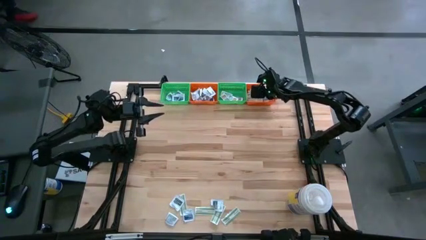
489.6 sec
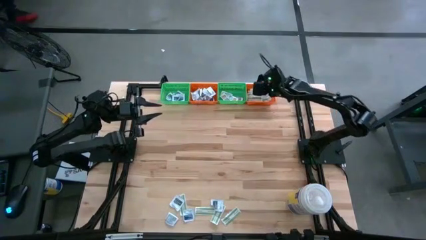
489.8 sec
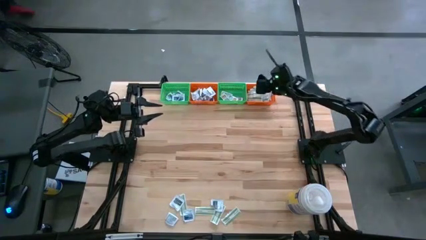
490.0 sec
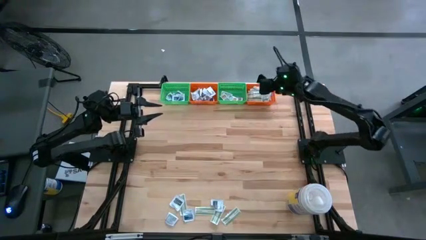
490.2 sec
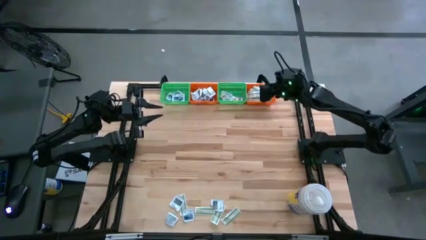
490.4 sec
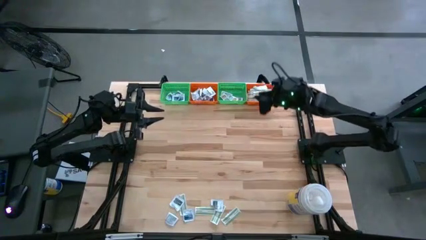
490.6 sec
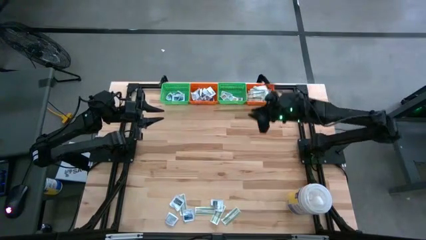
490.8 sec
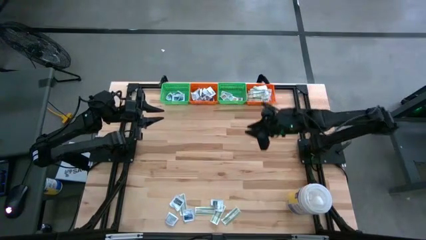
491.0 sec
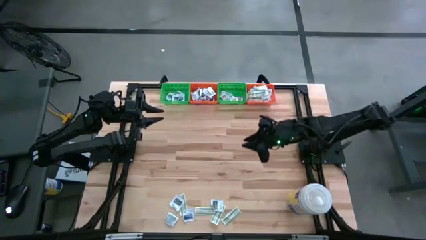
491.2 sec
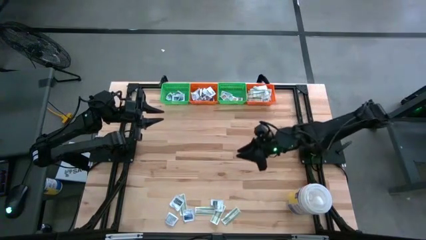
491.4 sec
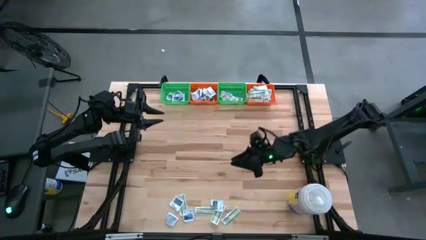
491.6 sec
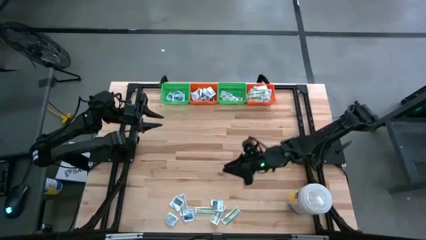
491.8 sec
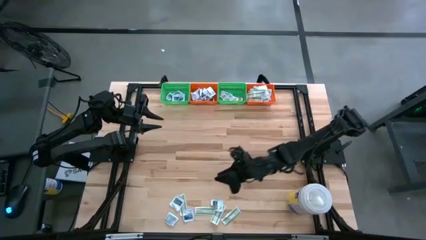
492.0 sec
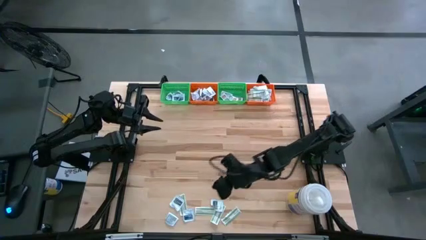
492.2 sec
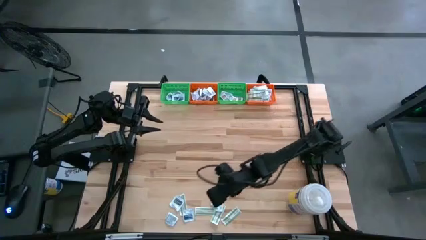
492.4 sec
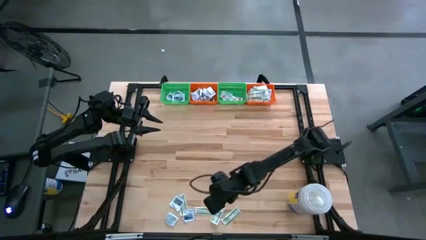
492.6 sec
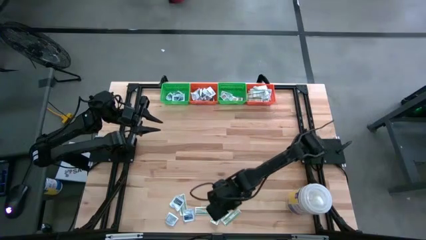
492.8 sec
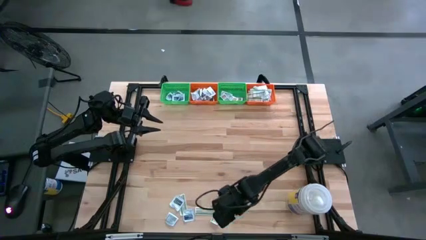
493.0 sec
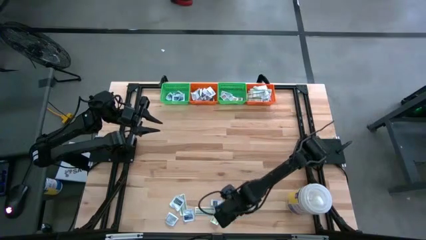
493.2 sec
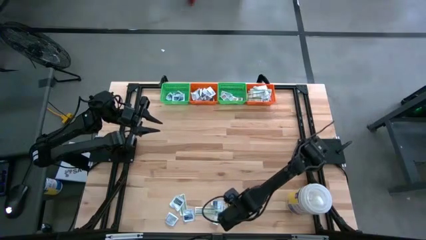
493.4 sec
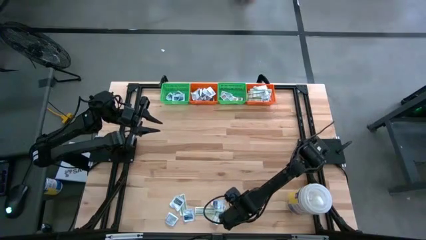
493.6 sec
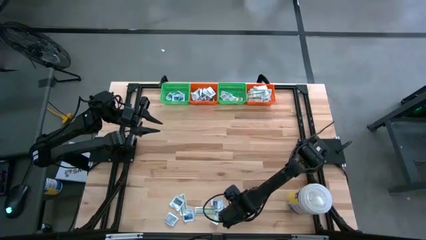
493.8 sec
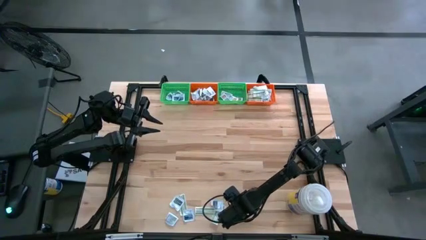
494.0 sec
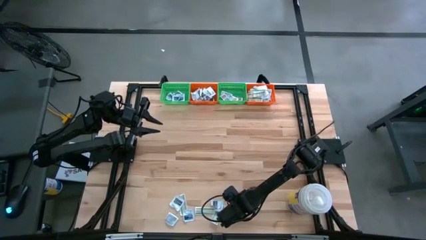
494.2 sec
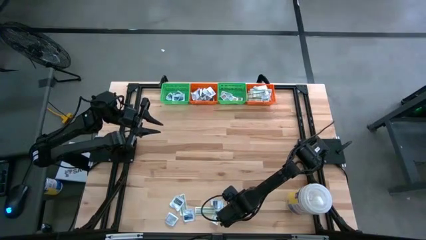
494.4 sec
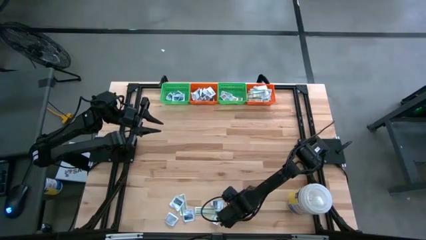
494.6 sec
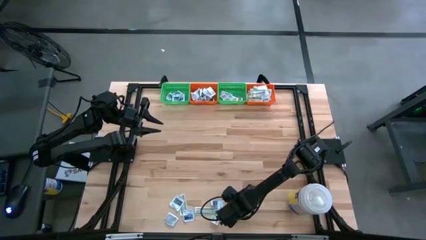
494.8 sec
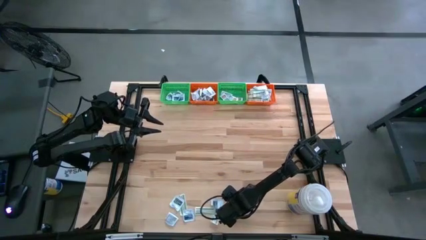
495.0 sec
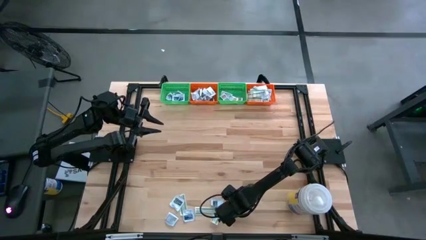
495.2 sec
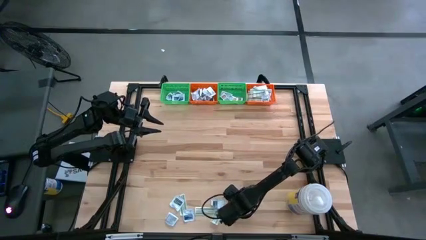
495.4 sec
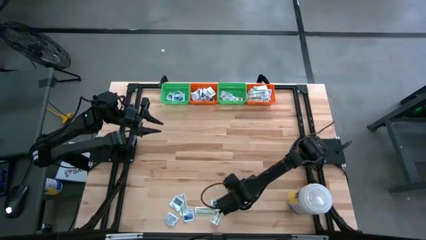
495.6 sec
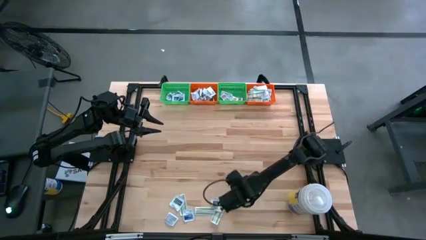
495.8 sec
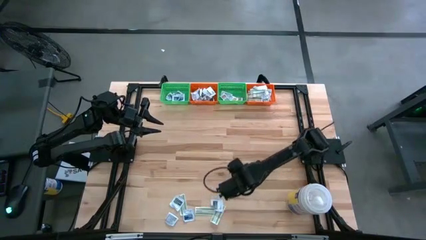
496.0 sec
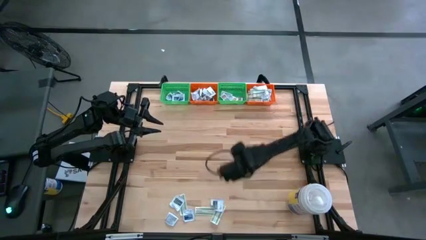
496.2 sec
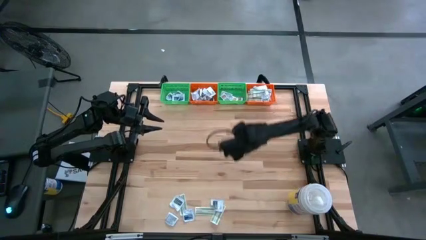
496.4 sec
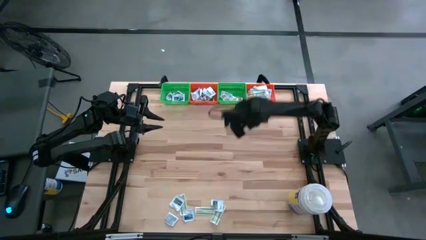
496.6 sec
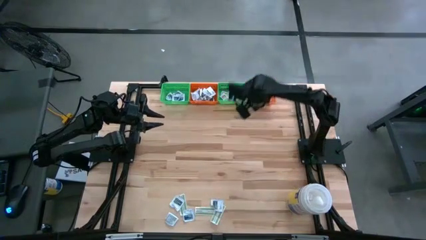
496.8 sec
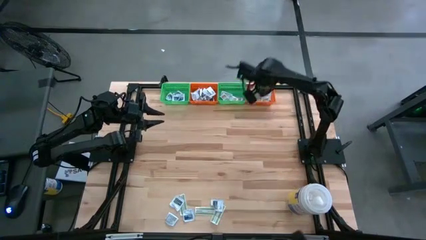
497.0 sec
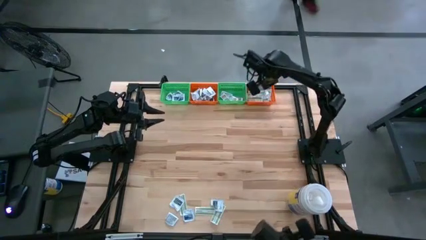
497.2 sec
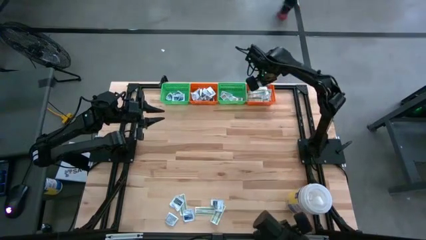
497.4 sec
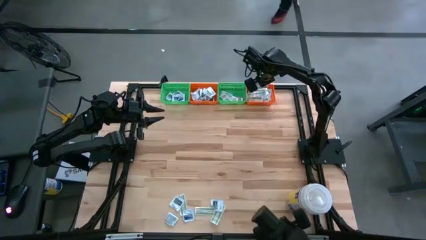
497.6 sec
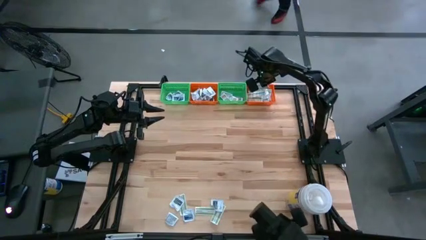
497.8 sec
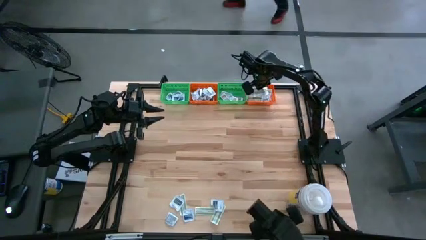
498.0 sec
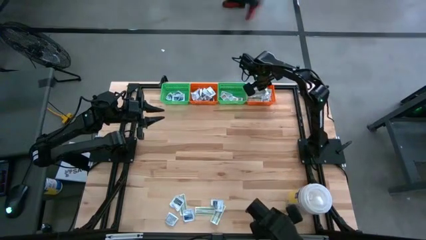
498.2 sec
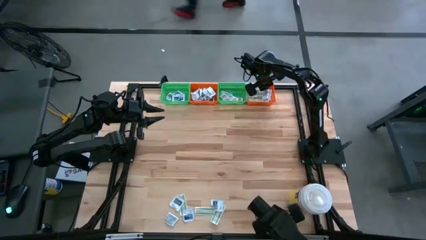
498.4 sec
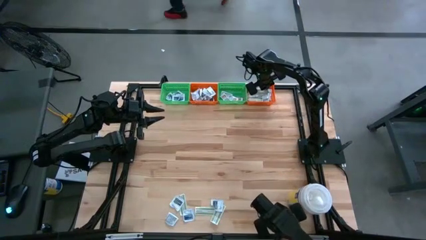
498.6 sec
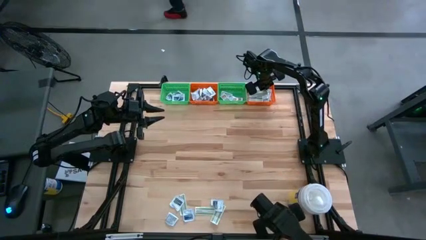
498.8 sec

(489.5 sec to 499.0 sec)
Task: Pick & Place First Aid Supplies
Put the green bandage pack in the right orange bin

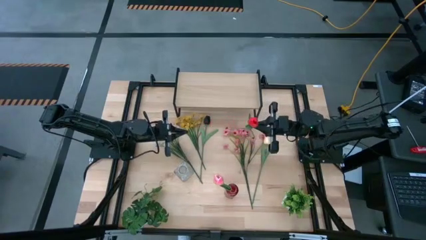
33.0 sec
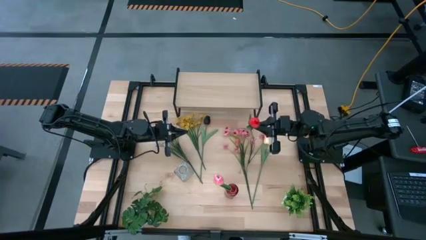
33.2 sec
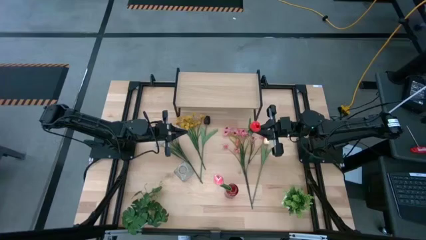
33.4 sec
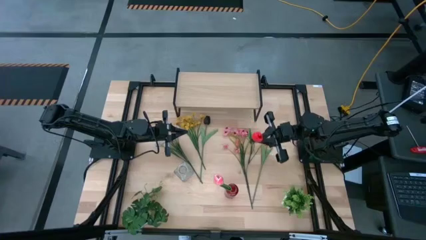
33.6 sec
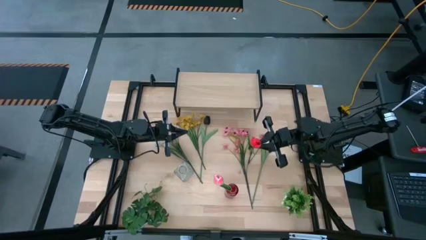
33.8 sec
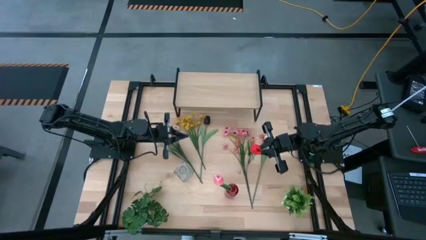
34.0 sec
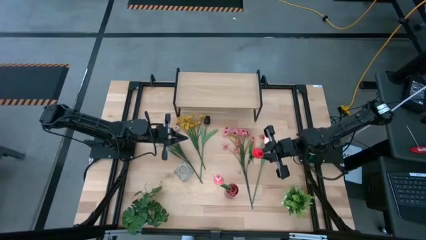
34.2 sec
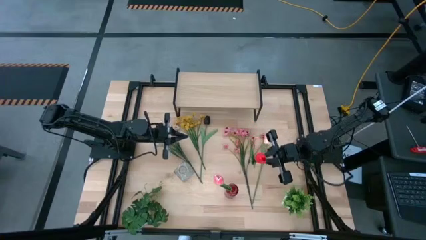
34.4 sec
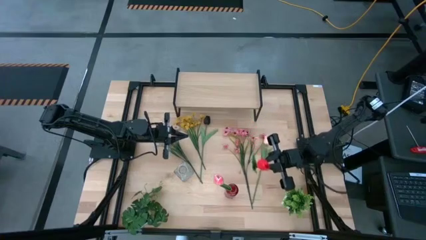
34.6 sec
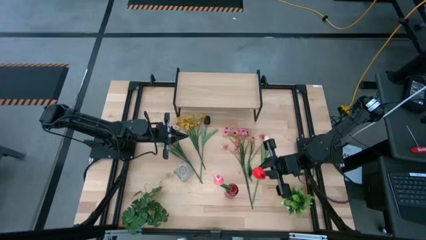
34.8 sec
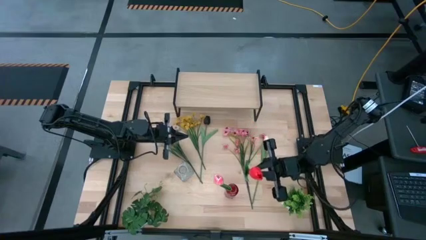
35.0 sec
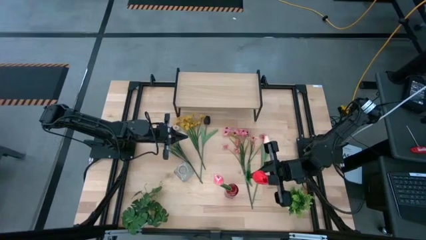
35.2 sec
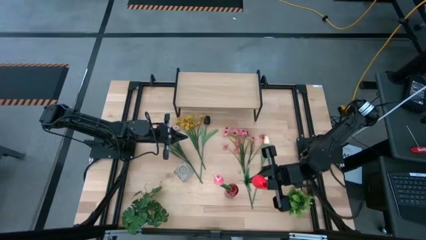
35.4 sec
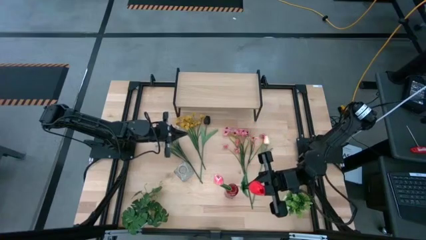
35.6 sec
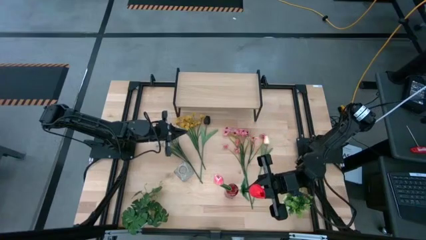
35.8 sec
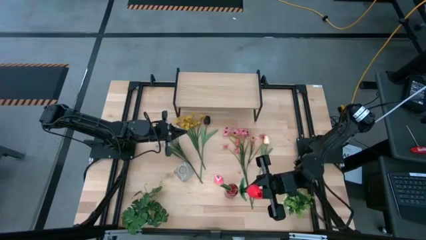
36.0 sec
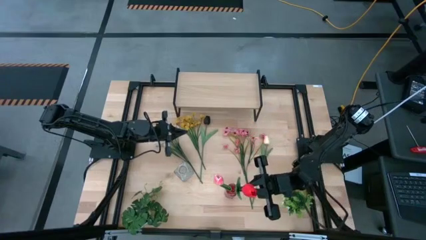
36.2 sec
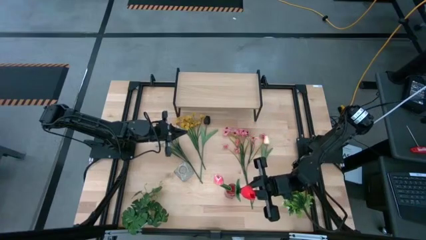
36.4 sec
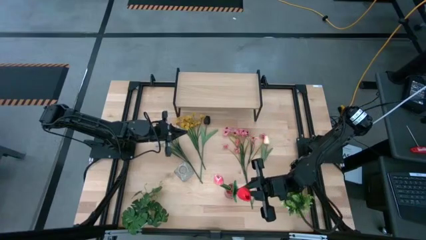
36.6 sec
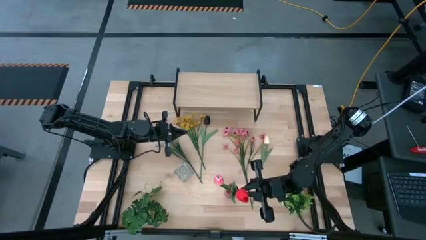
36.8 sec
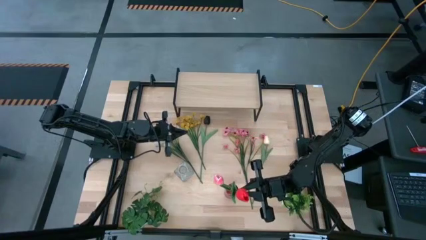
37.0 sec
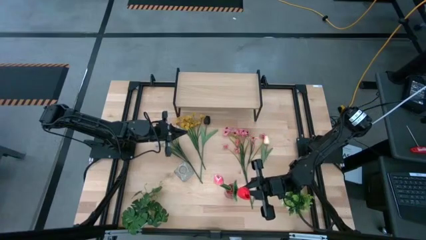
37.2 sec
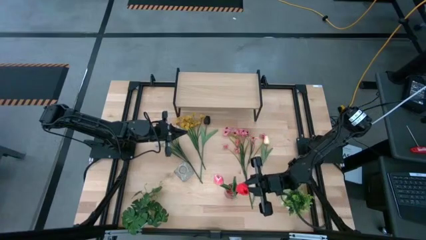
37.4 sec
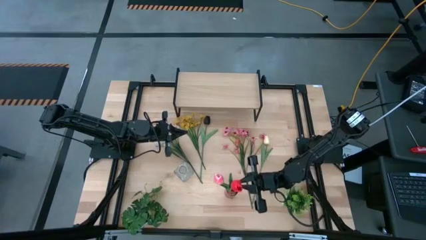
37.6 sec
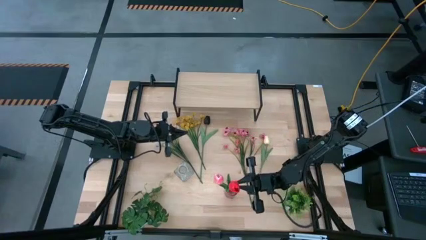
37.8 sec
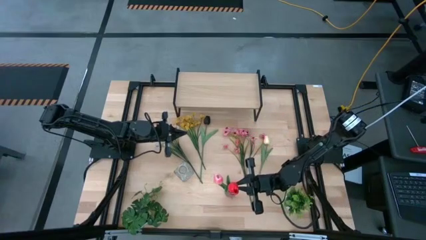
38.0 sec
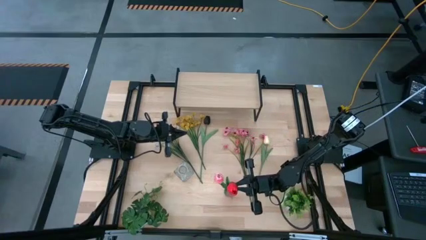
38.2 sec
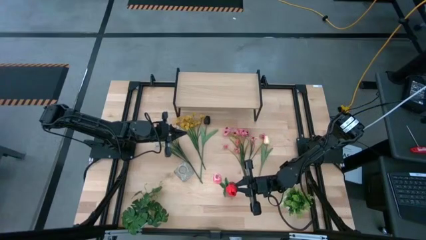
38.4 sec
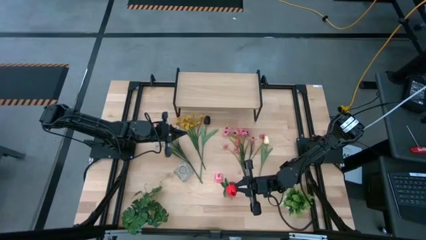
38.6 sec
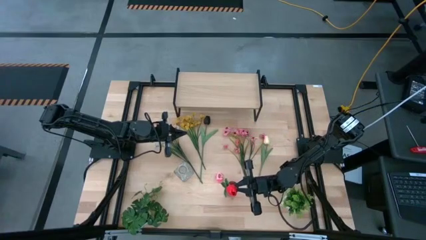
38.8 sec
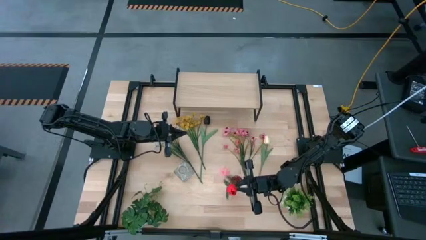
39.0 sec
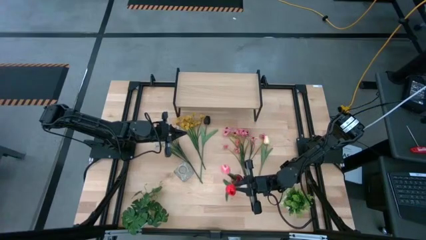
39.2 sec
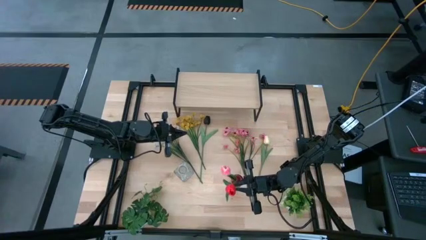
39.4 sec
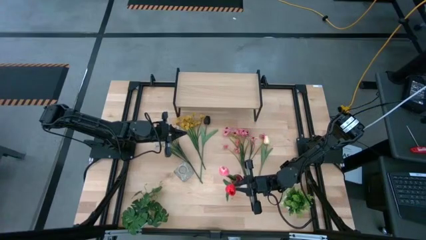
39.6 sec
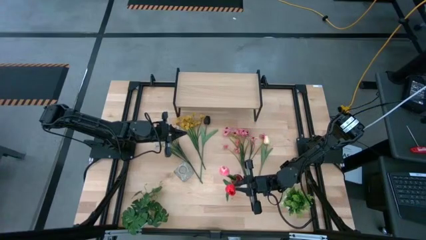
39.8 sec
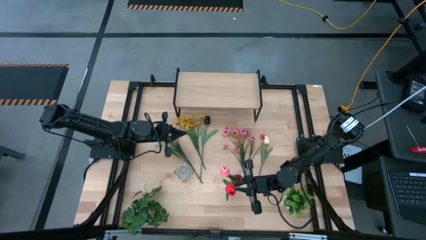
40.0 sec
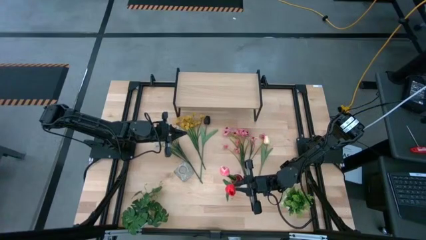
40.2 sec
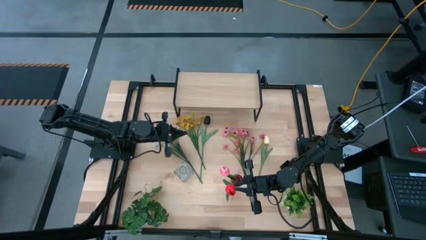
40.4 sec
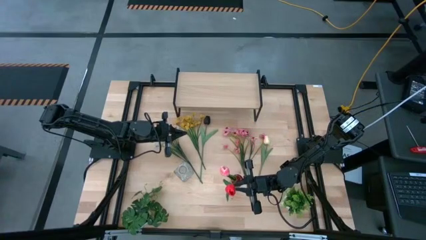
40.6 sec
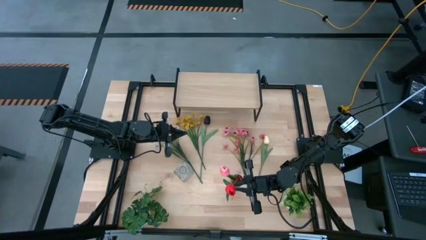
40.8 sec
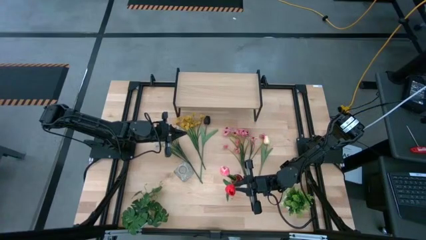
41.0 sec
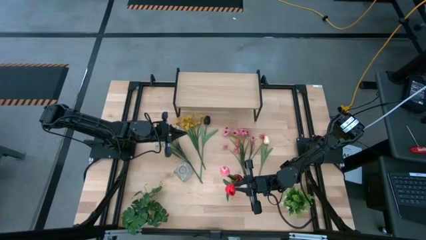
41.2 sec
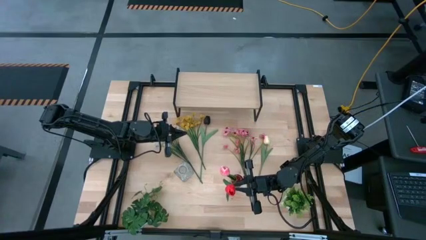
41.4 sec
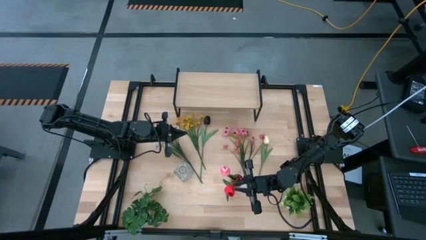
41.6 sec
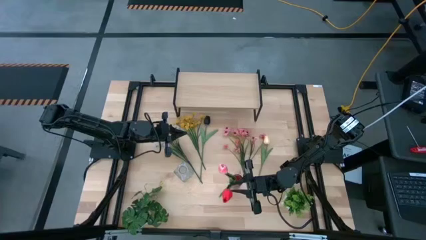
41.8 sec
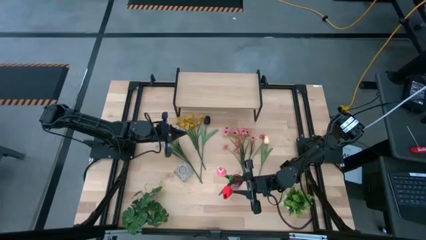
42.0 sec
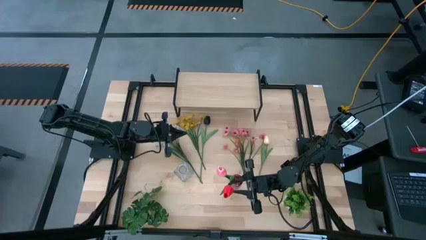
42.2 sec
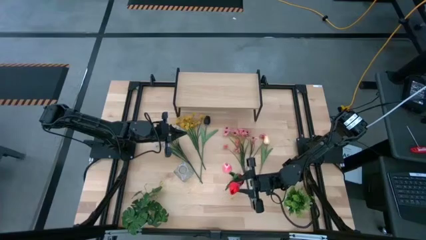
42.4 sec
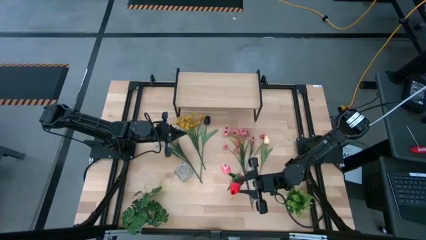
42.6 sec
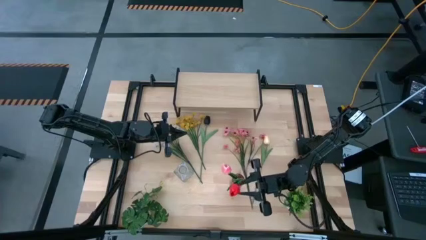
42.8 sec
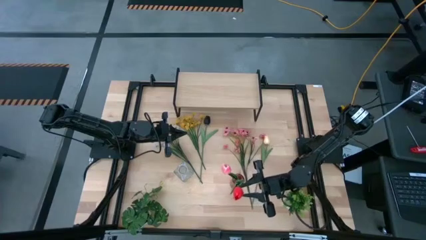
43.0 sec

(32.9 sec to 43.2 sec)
Task: Pick and place flowers into a vace then onto a shelf
Put the red tulip into the red vase
